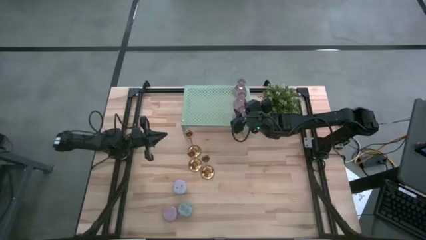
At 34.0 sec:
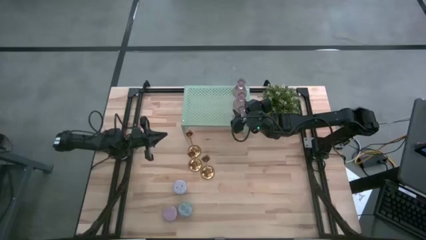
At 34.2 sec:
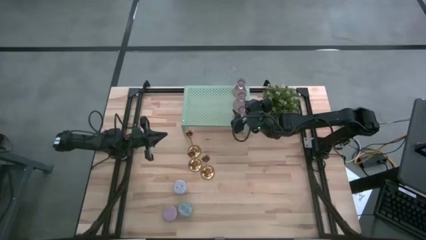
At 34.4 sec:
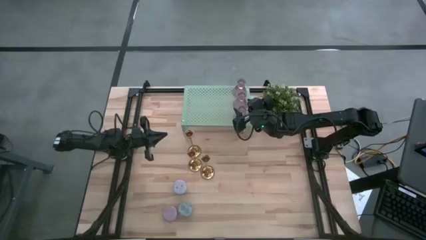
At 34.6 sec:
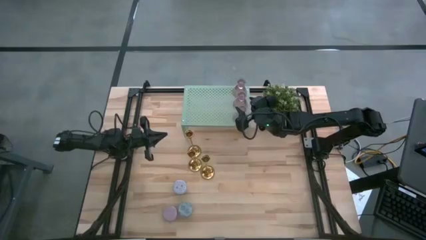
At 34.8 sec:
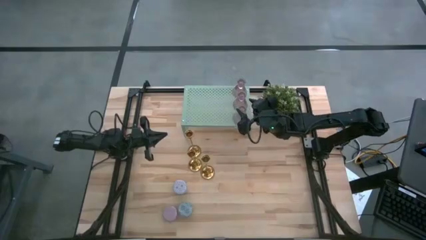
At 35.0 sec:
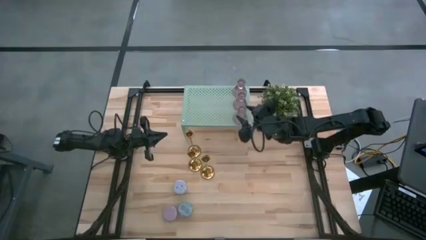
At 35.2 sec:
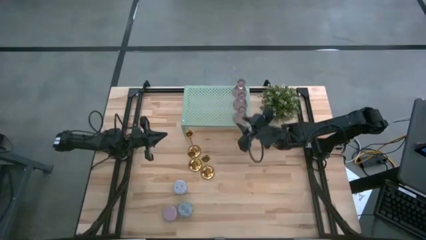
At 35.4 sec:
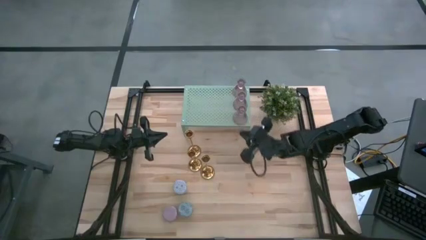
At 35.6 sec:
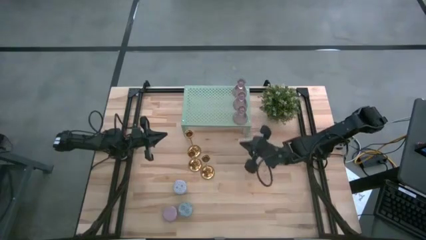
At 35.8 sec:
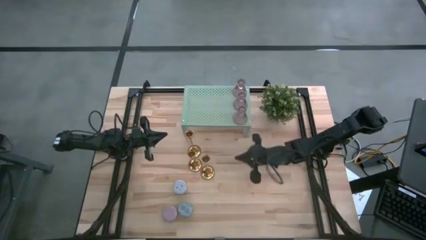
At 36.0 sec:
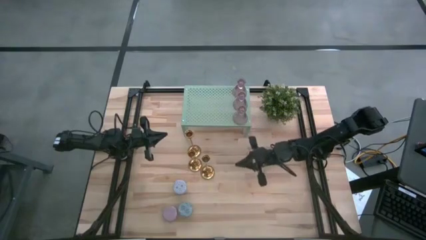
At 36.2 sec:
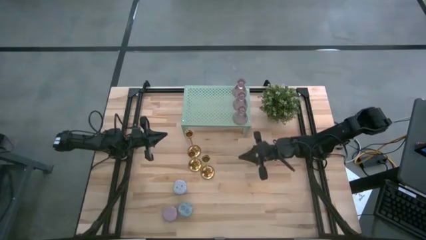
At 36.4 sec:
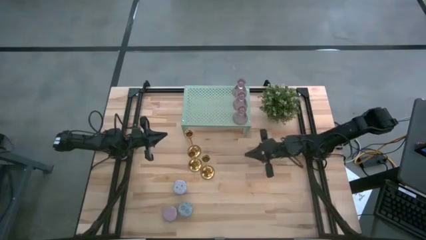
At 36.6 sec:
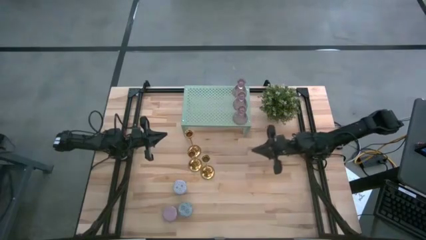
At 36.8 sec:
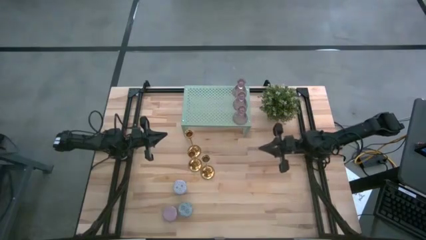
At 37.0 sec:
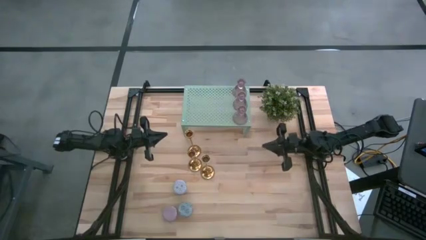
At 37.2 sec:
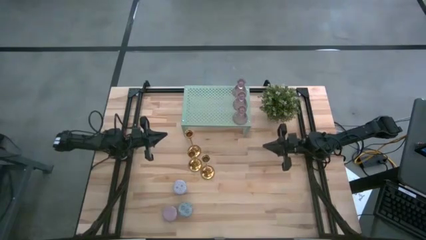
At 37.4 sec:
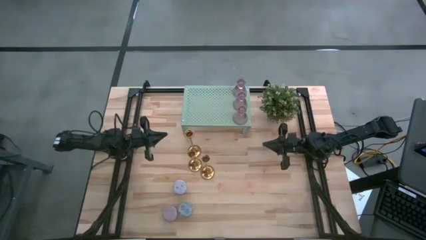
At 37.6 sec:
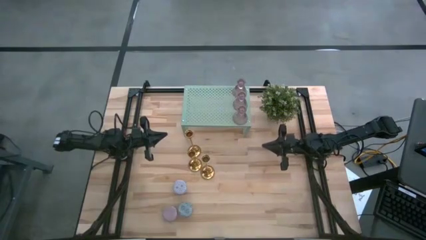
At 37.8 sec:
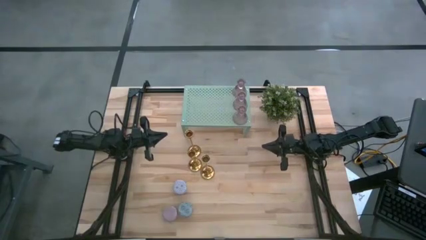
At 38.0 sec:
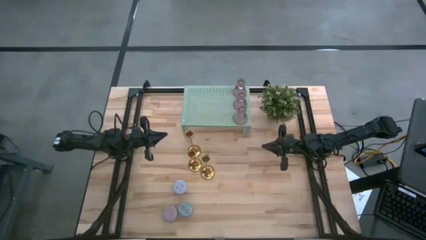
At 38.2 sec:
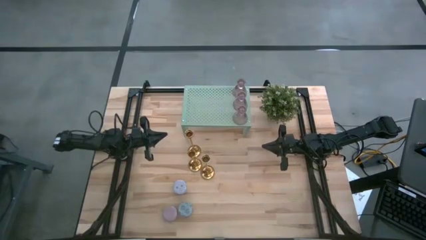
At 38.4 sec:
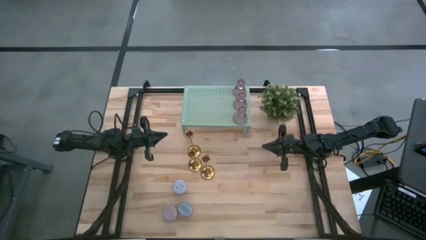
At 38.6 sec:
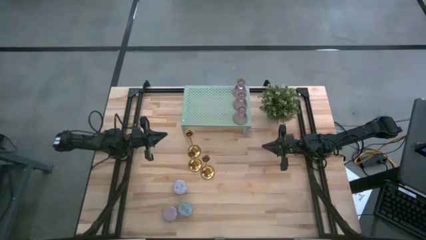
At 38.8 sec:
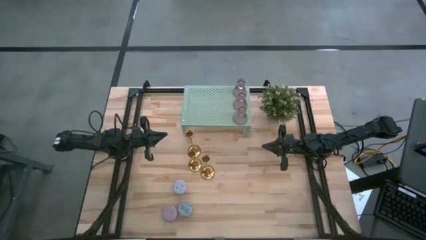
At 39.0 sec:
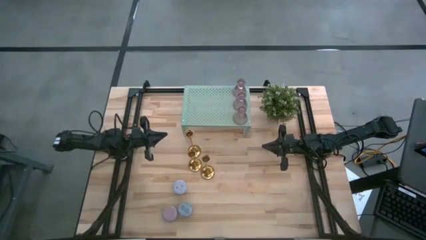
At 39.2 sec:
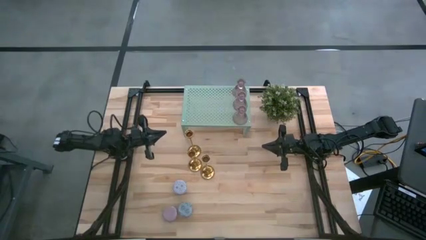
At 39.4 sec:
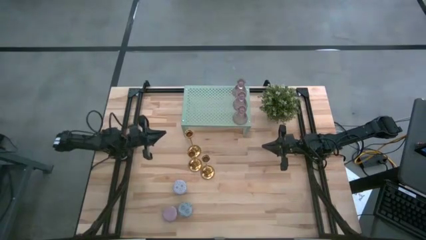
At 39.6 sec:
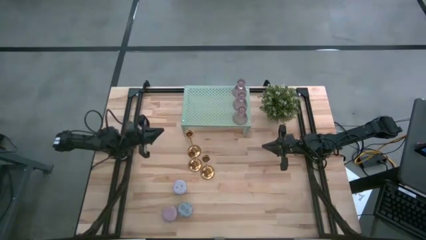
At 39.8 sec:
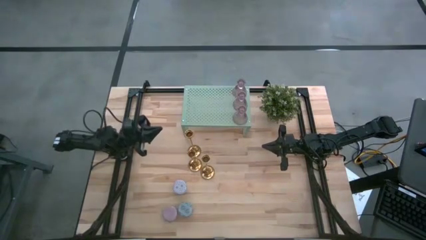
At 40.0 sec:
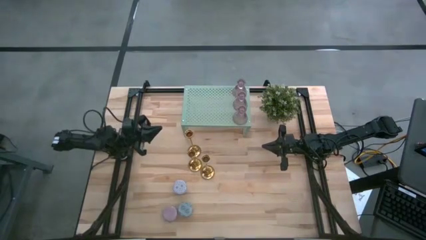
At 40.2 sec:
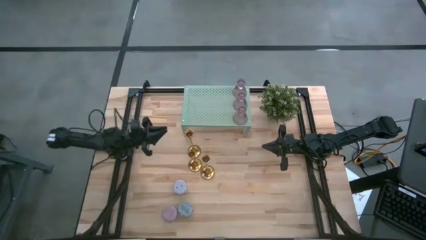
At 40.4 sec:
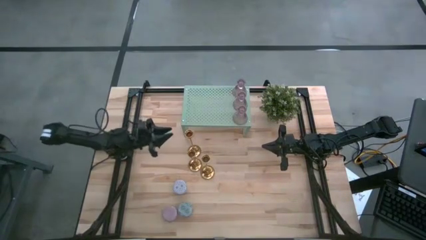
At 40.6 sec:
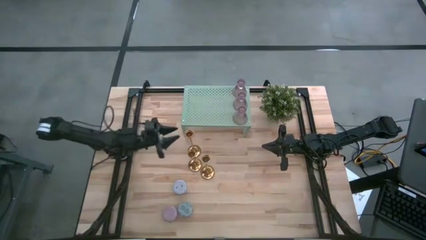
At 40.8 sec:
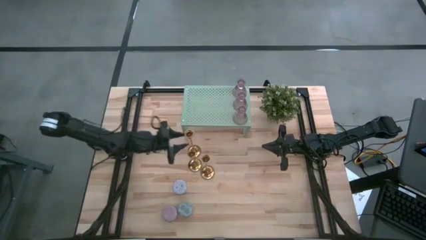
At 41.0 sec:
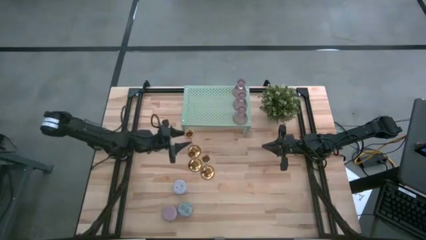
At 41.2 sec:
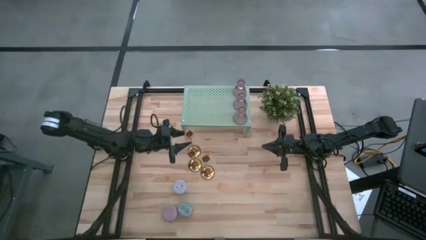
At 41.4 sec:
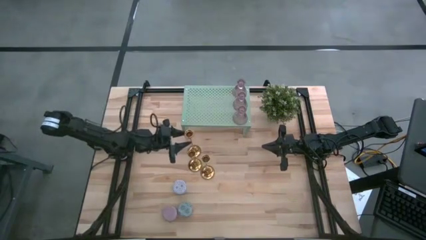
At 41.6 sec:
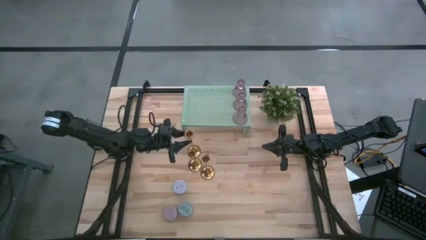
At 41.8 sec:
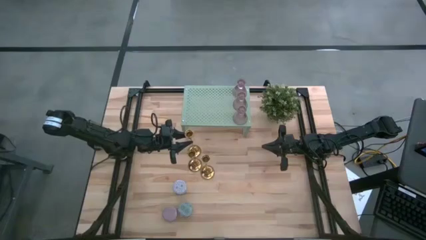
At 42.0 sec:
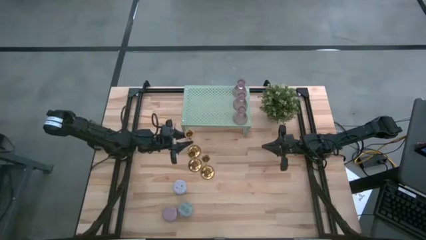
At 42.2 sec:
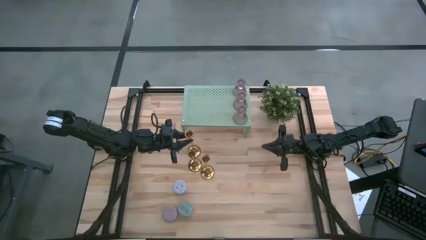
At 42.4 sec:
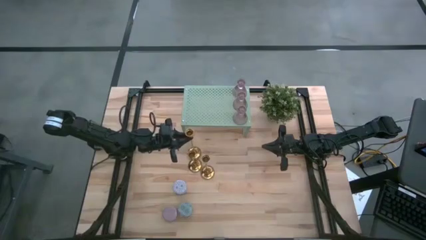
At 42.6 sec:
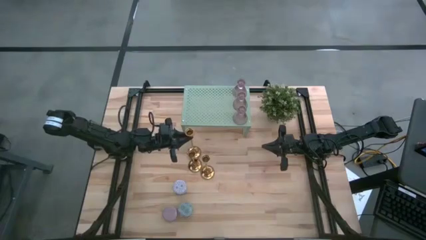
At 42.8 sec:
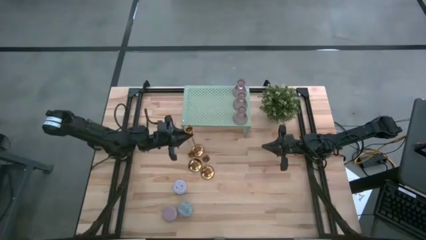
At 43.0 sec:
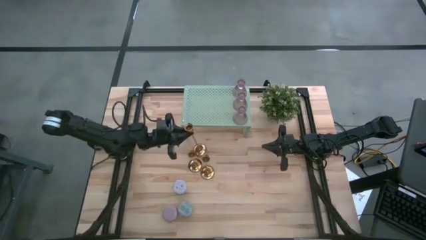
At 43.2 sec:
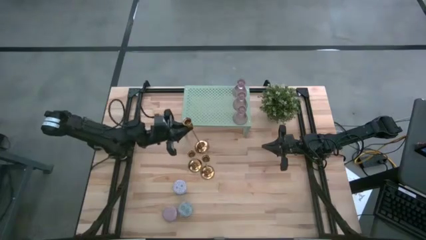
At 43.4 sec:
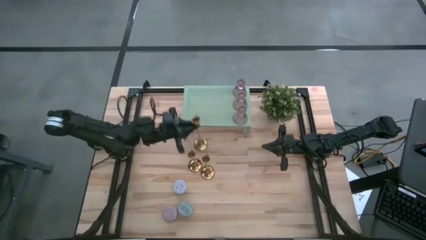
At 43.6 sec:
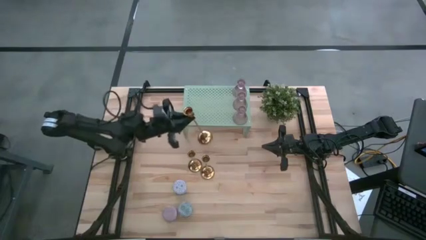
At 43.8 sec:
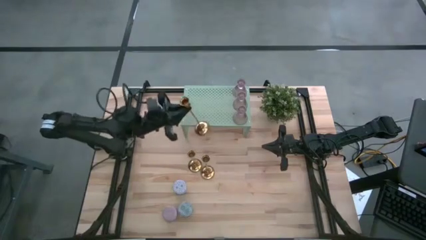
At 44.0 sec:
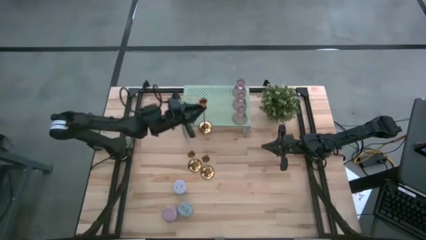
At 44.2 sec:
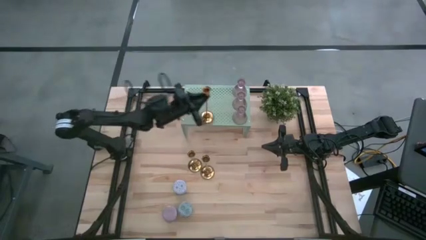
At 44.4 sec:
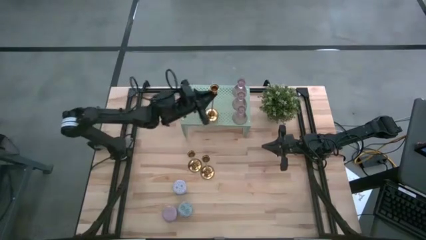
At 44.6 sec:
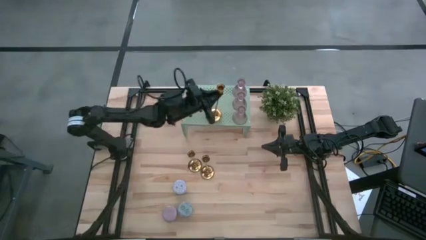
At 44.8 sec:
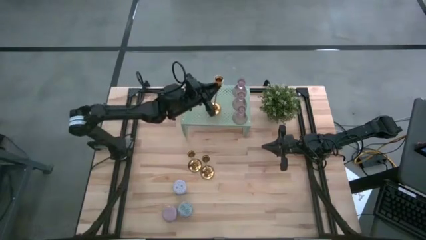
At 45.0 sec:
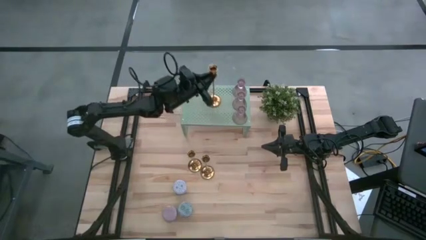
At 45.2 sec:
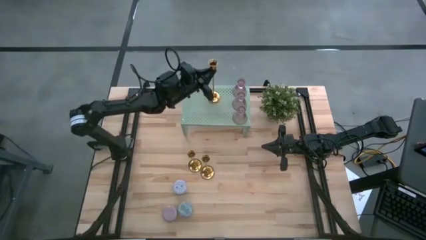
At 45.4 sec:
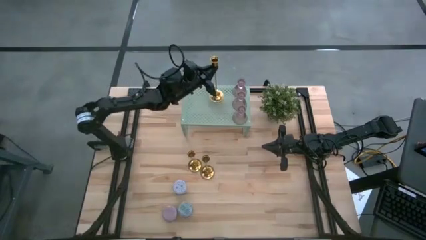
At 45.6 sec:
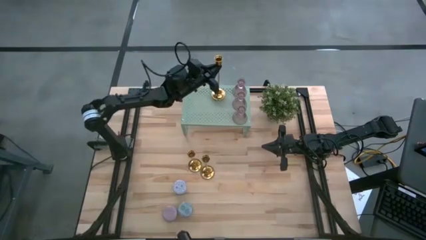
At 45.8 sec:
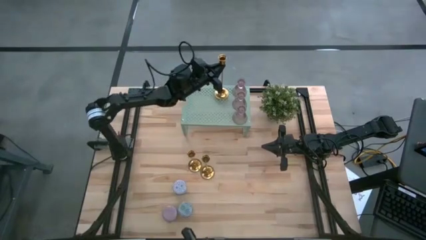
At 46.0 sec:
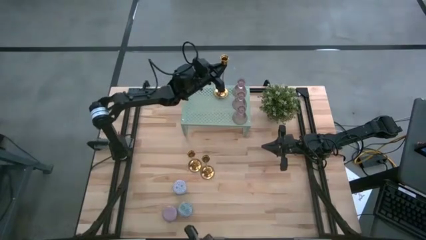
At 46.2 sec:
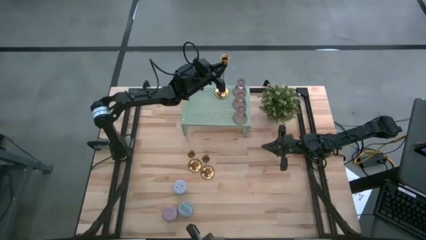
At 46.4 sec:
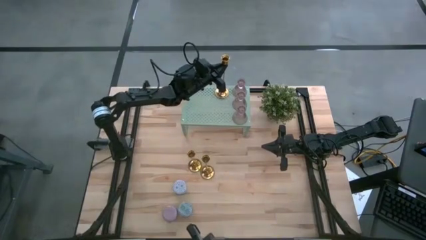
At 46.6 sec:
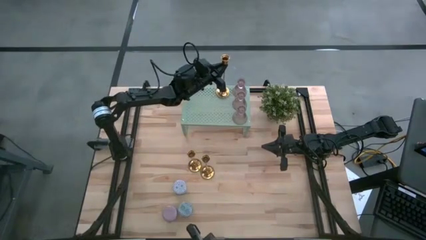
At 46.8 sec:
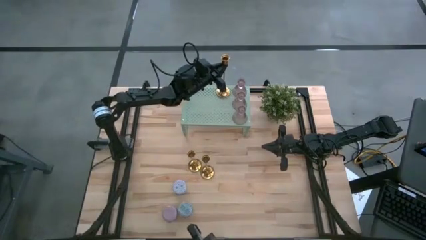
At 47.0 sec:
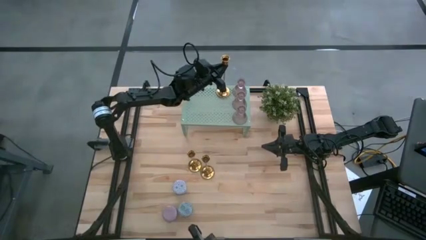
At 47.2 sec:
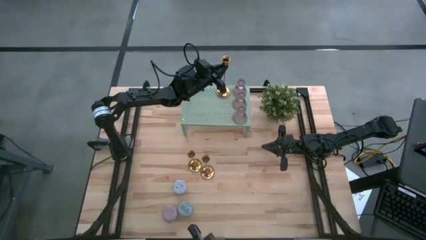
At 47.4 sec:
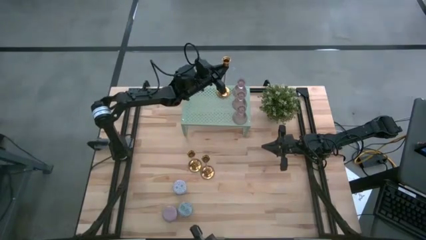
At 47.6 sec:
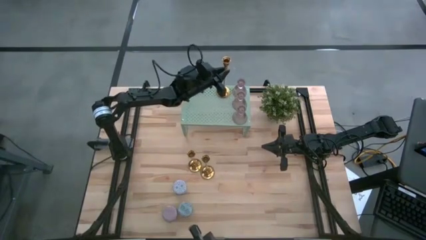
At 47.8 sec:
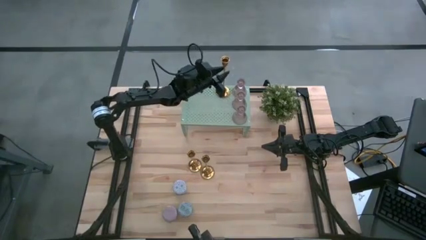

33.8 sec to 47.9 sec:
Task: Pick & Place candle stick holders
Put the top left gold candle holder on the shelf
